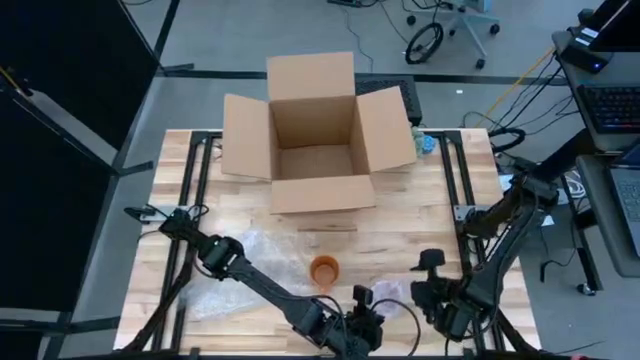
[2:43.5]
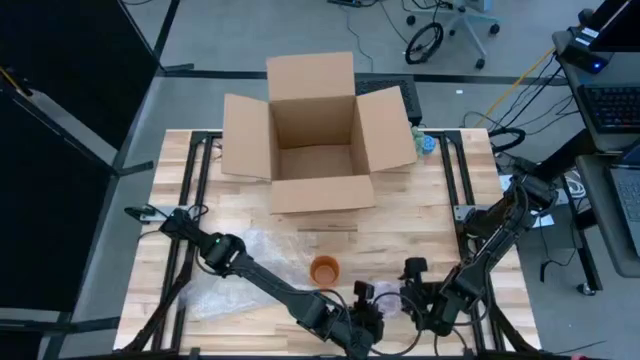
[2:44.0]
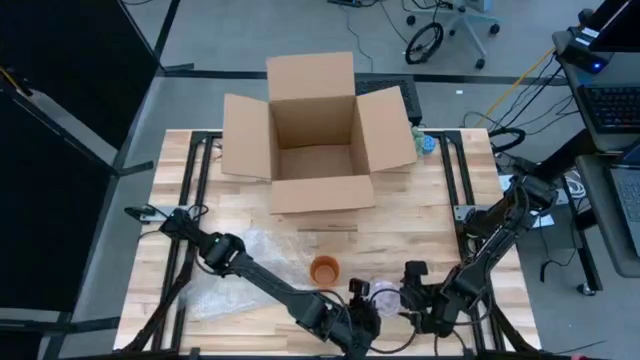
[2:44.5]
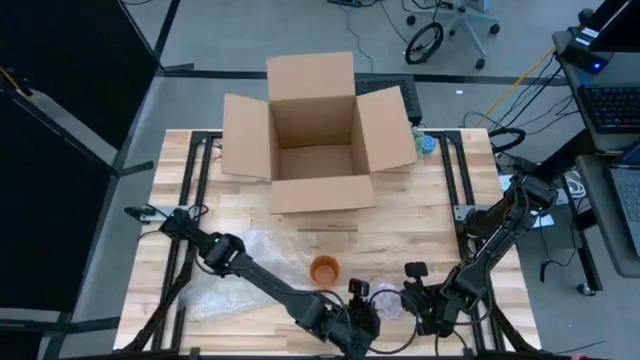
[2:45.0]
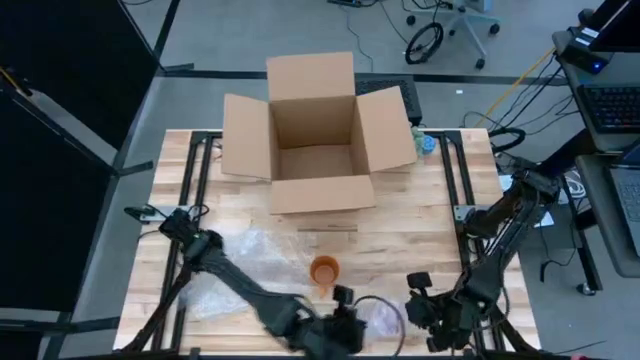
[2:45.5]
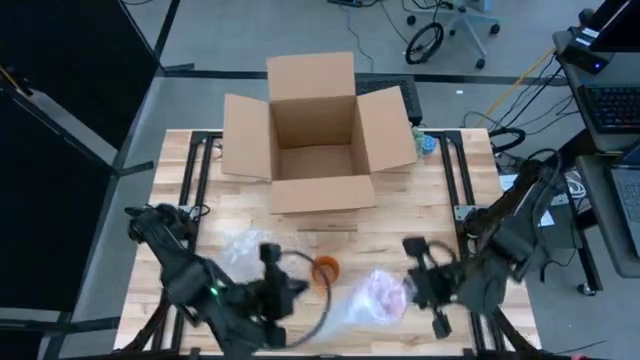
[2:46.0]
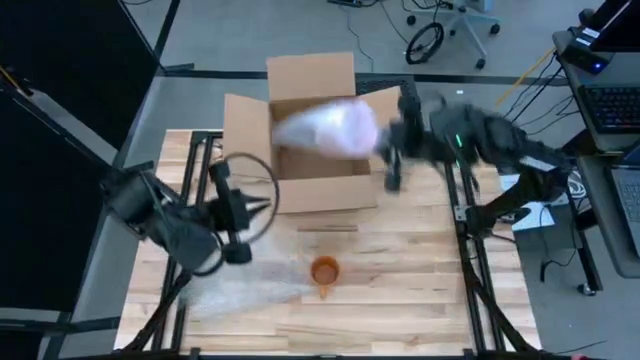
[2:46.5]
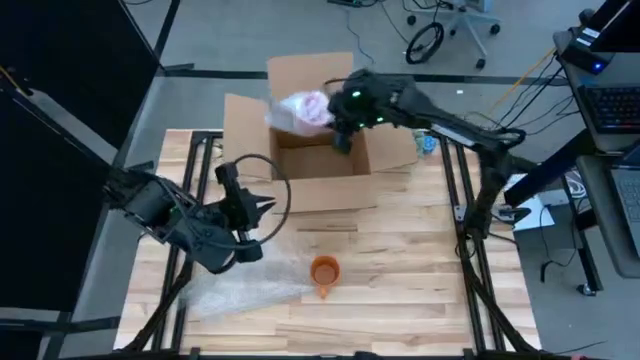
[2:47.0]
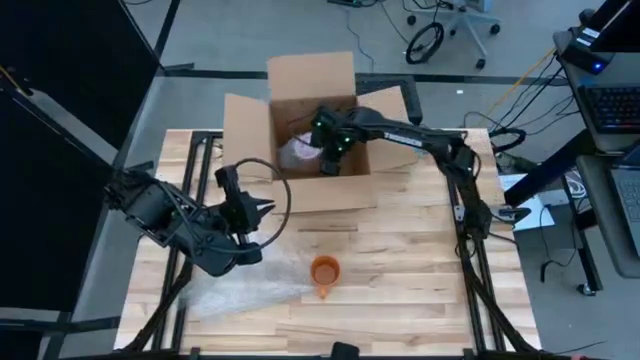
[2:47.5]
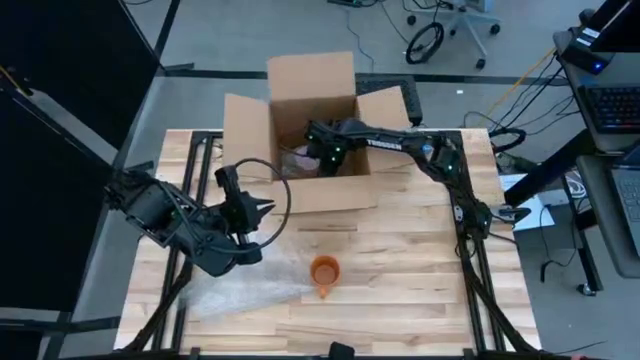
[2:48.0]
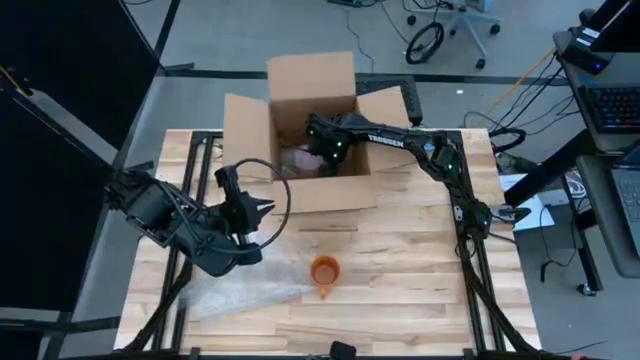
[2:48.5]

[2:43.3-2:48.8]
Task: wrap mug
Put the wrapped pink mug into the brown cardboard box

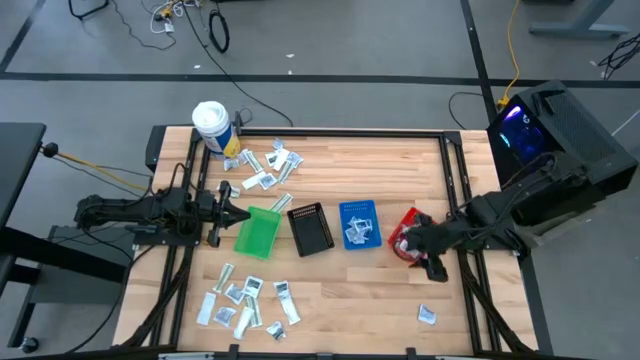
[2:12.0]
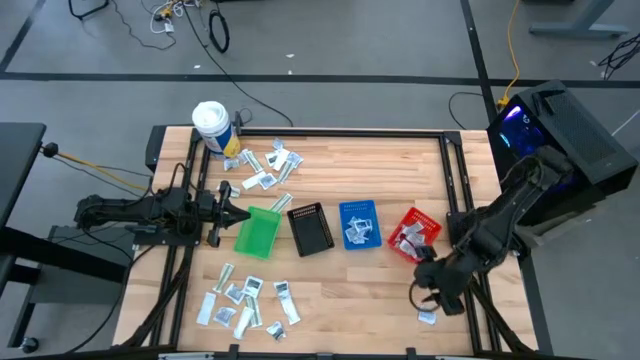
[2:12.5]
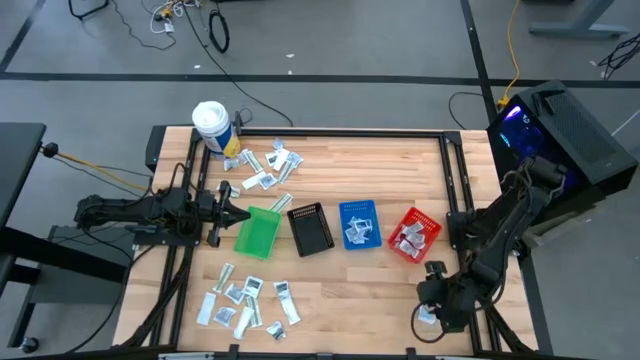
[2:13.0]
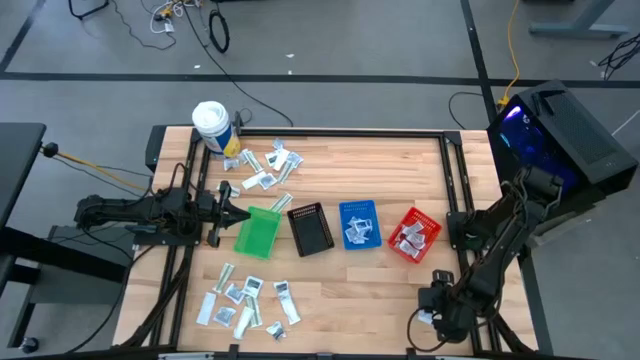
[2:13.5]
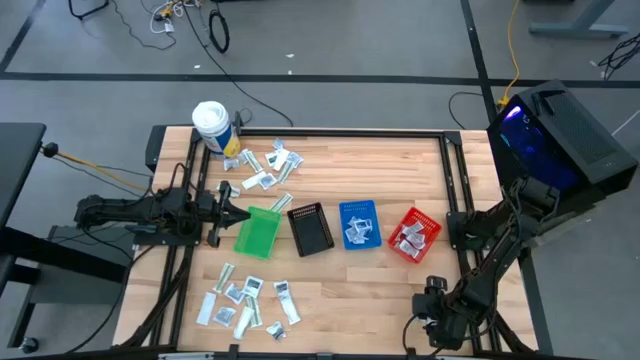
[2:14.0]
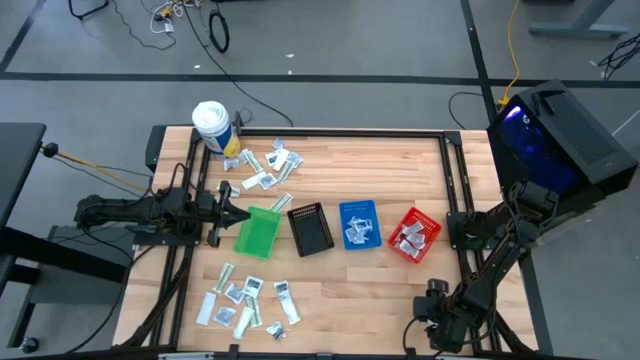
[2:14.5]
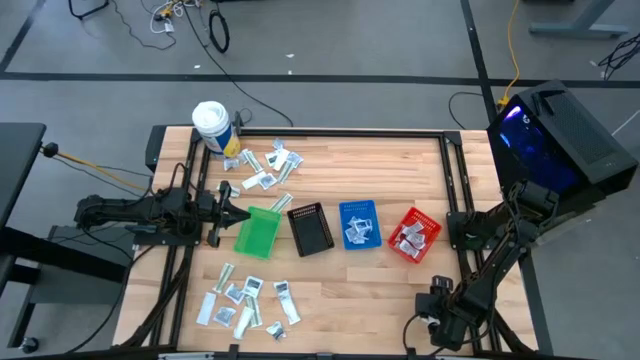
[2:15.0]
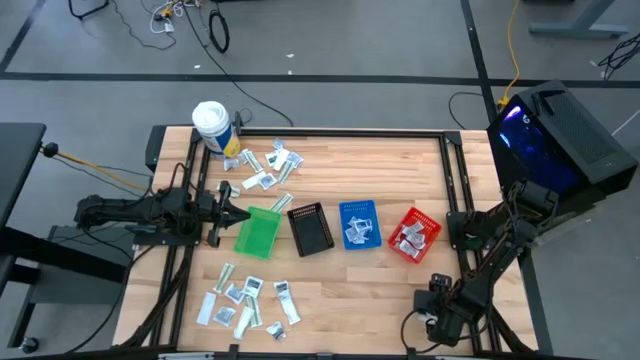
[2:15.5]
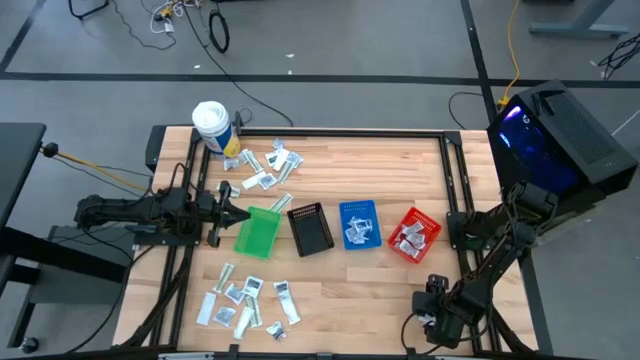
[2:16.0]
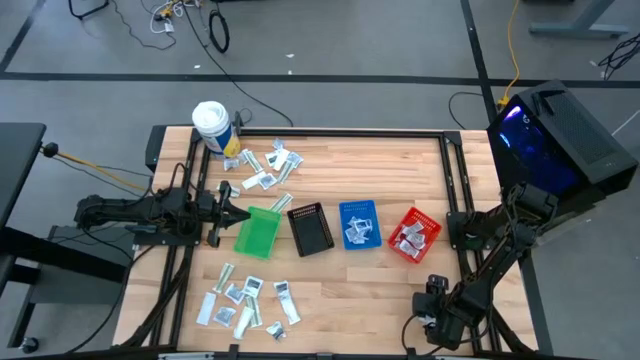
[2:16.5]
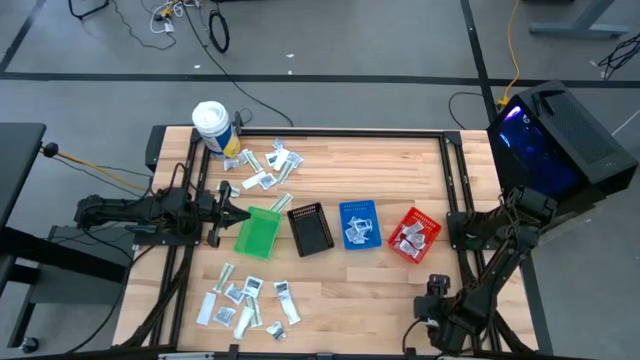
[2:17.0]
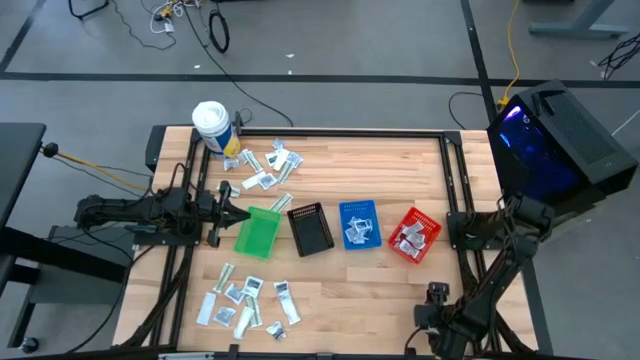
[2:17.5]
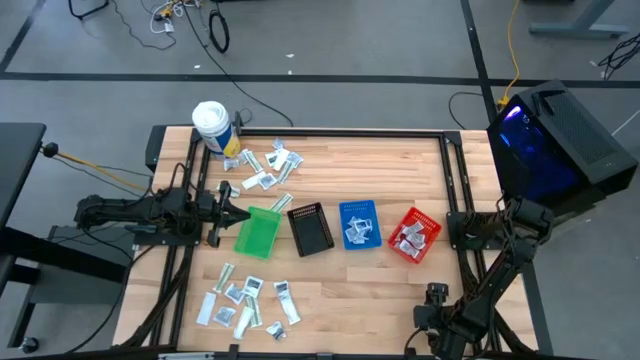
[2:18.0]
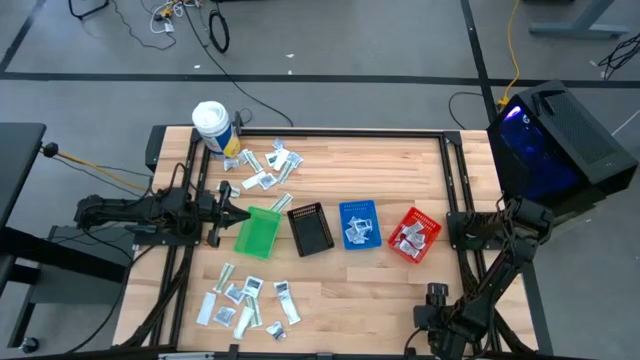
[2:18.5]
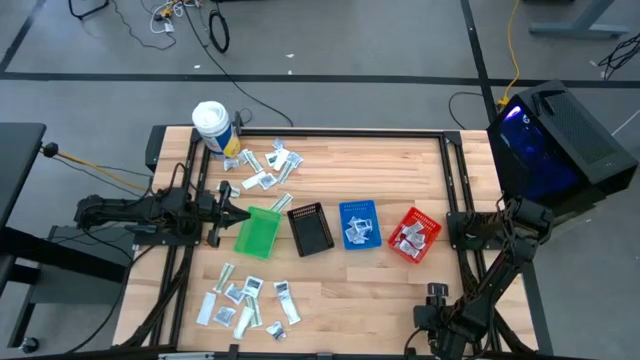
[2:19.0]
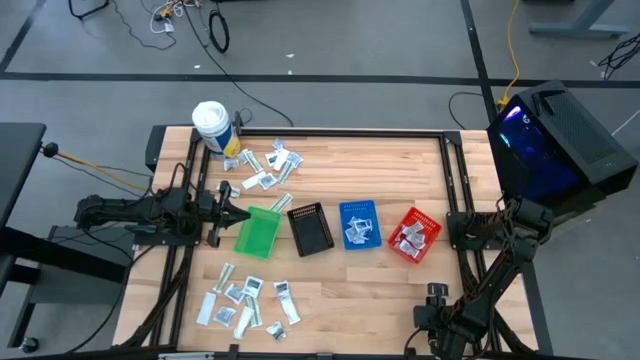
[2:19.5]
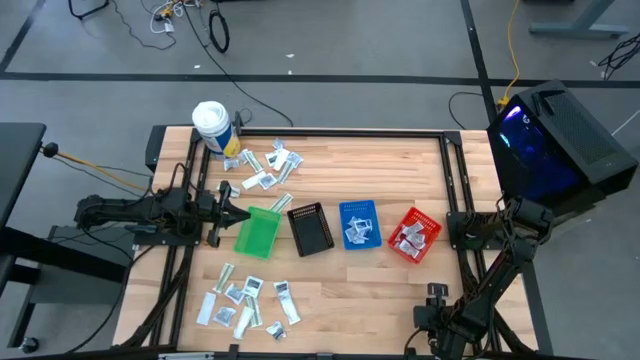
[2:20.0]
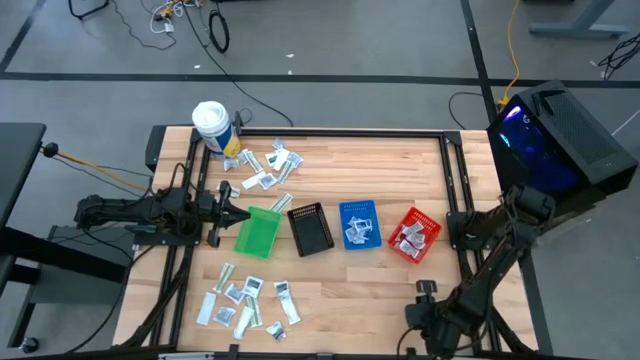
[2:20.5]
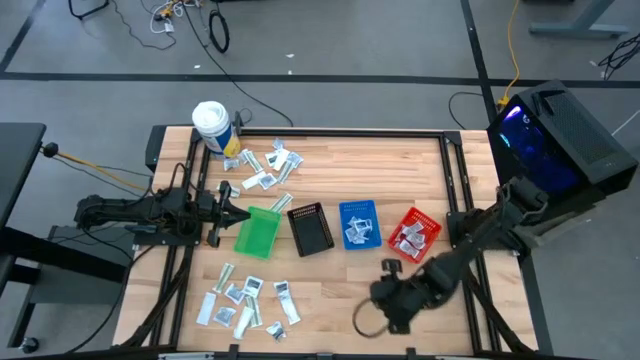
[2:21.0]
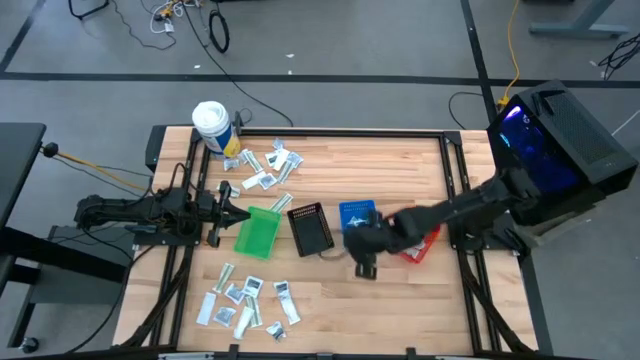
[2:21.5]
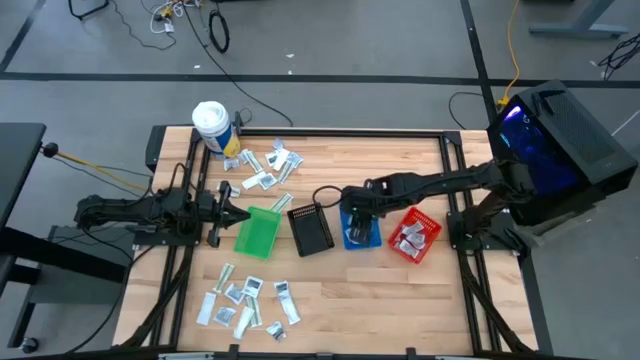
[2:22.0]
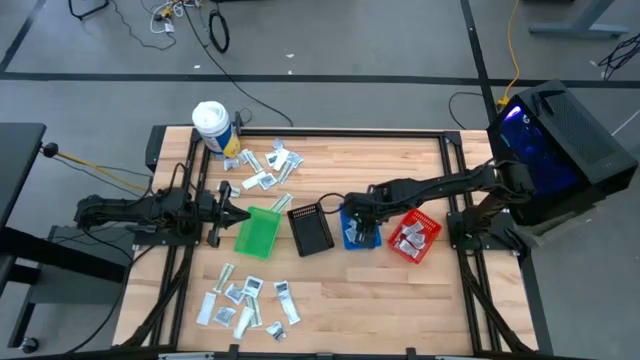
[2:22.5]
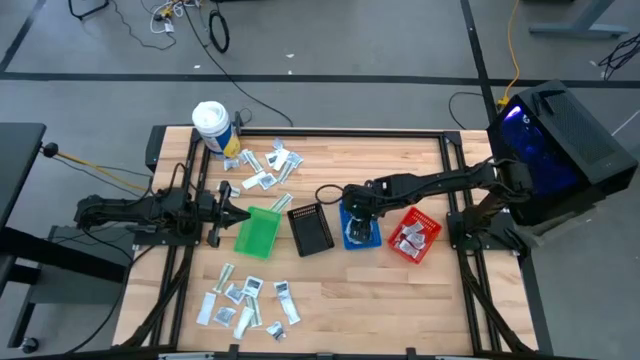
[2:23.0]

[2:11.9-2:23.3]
Task: Pick & Place First Aid Supplies
Put the alcohol pad into the blue basket
